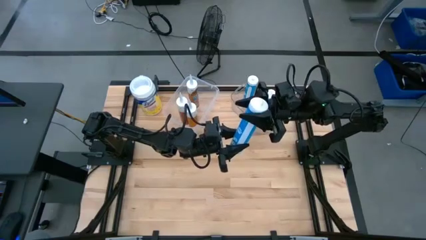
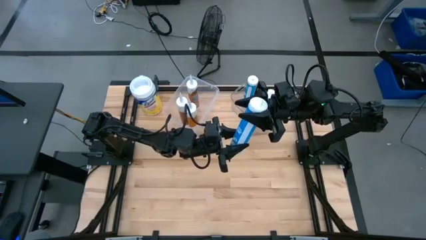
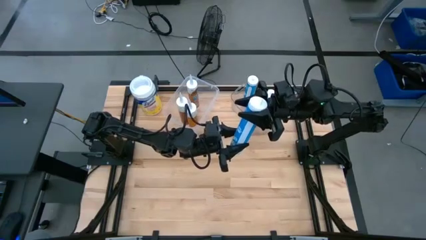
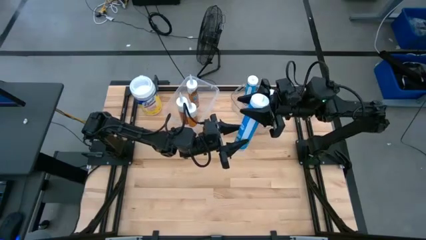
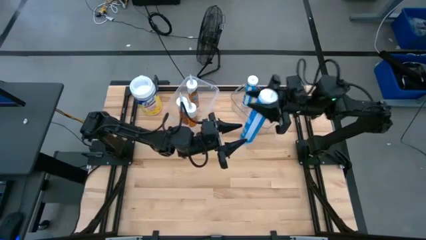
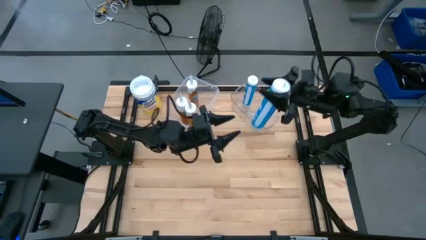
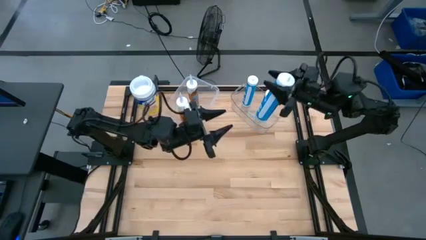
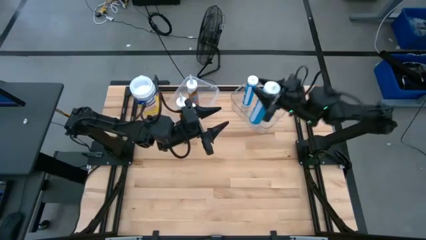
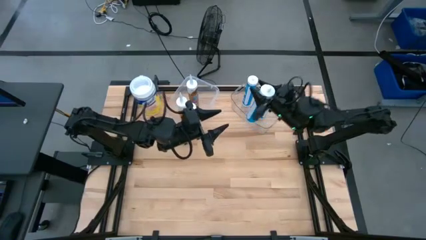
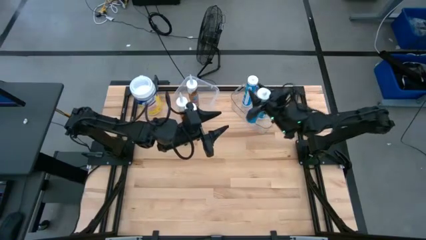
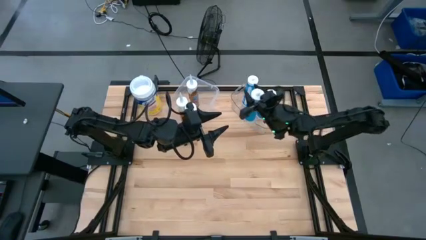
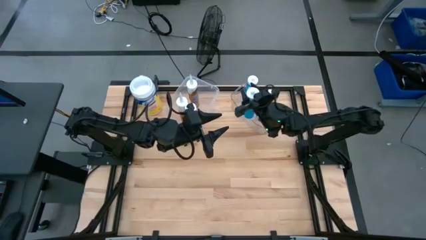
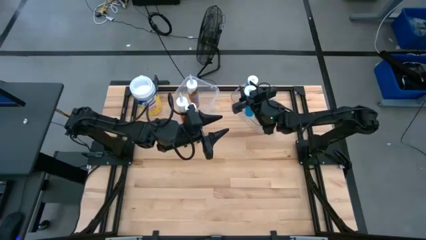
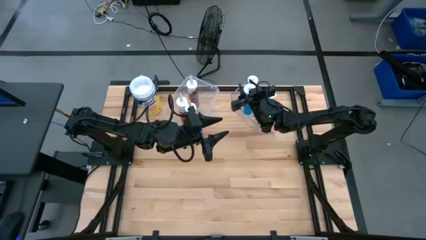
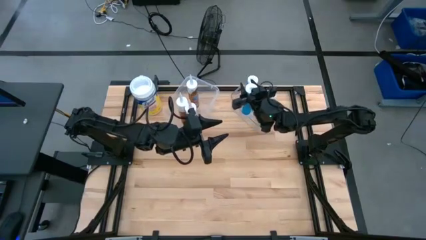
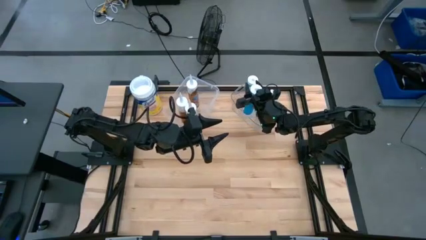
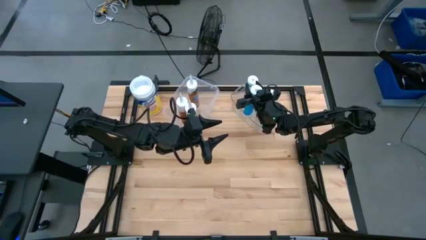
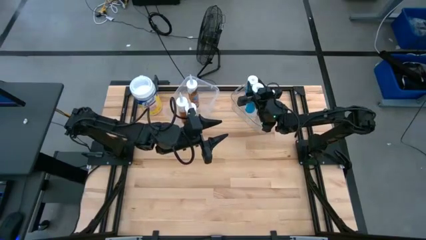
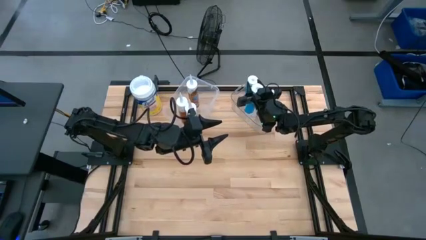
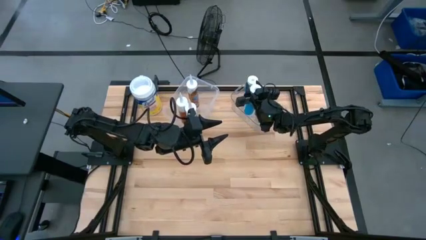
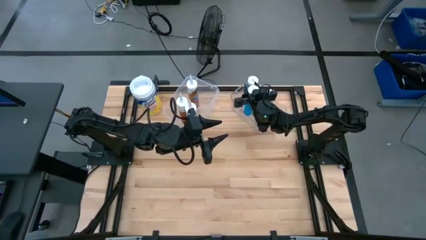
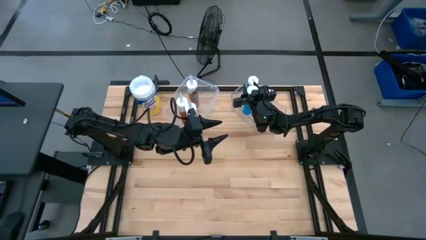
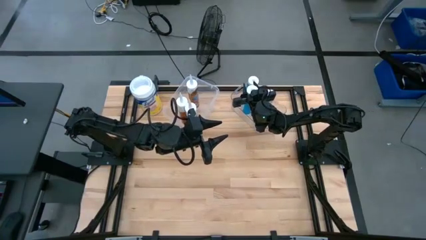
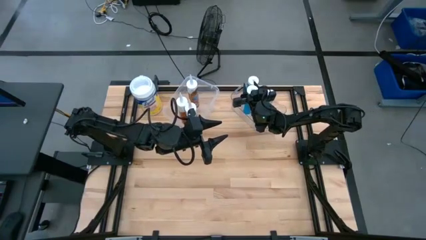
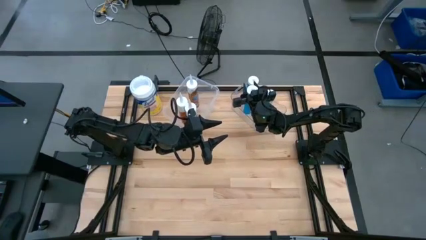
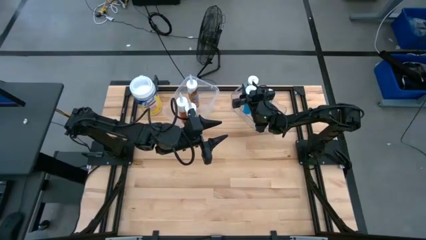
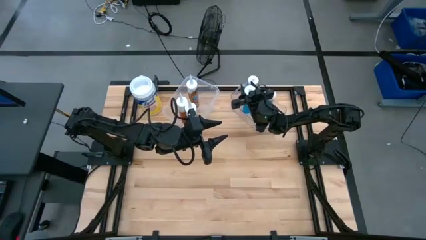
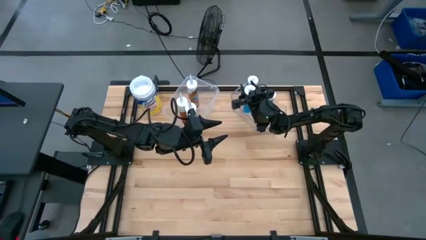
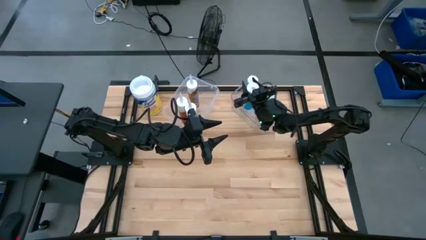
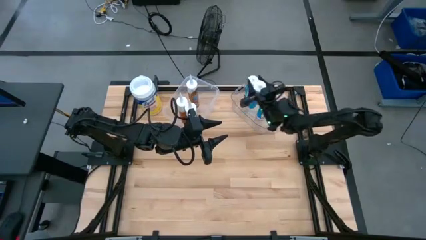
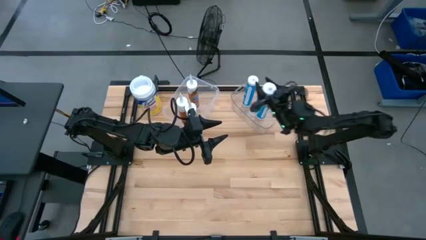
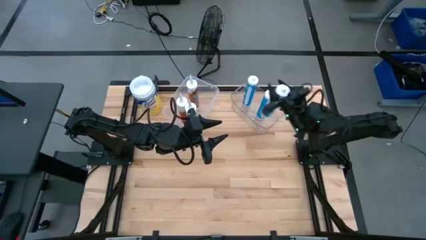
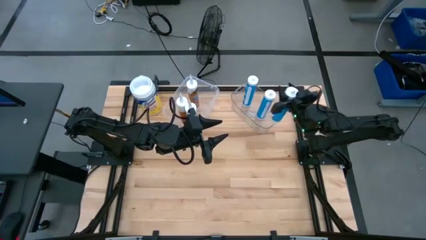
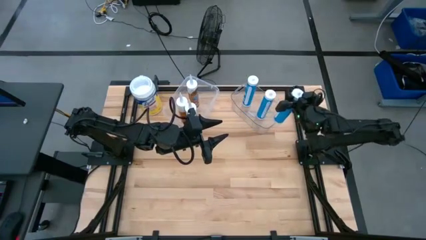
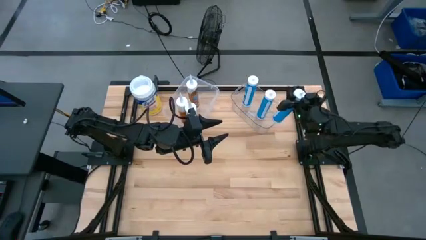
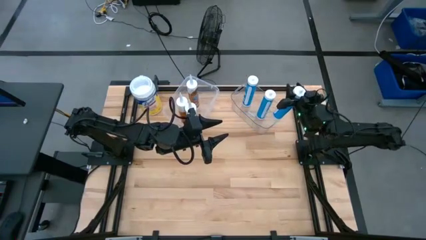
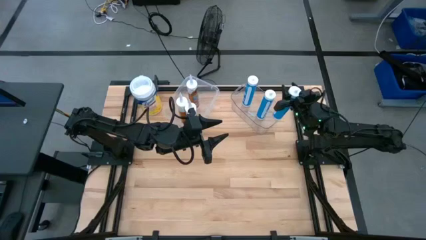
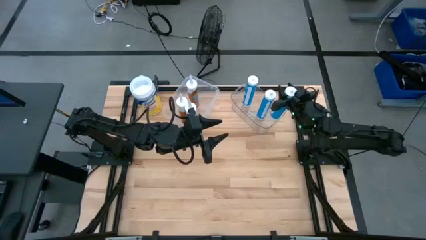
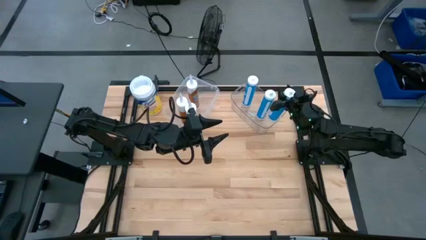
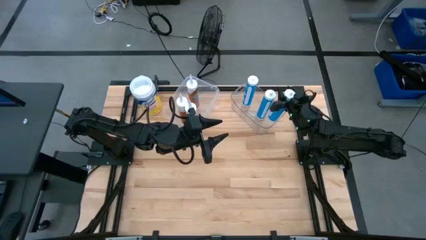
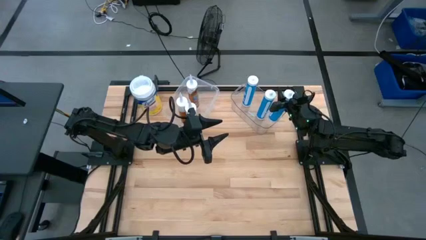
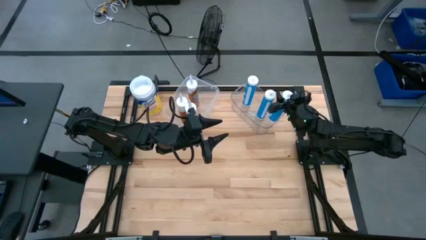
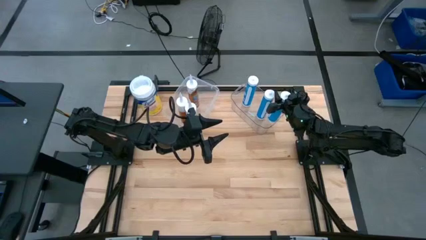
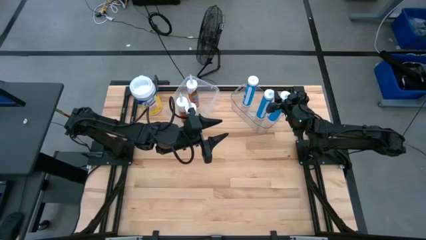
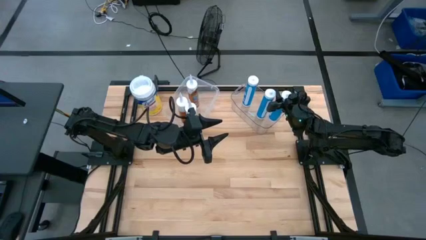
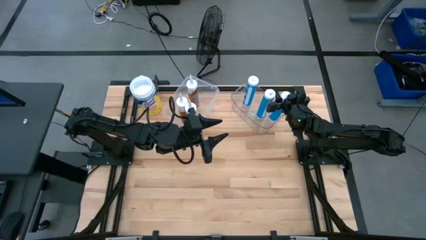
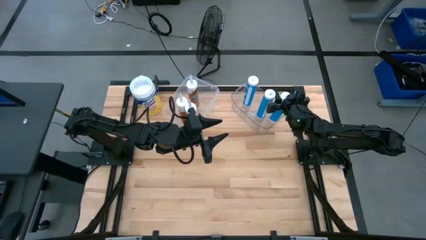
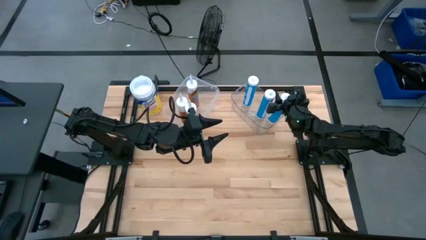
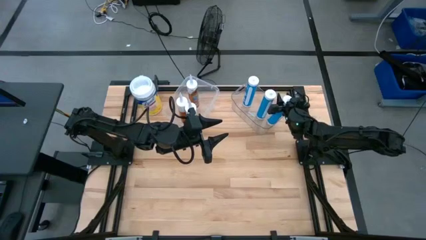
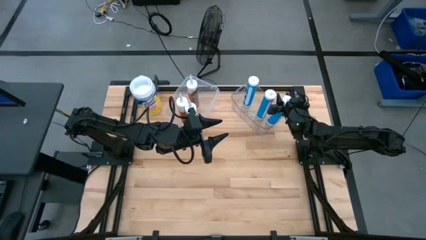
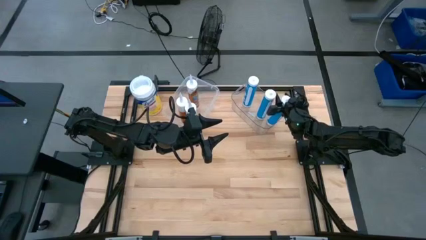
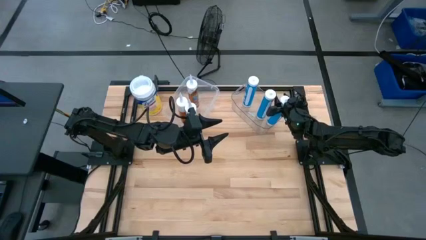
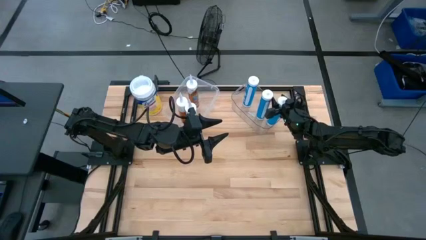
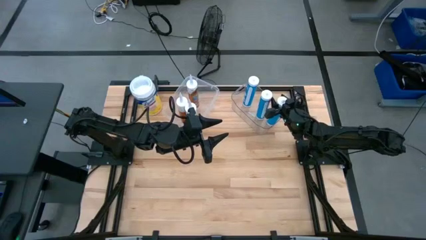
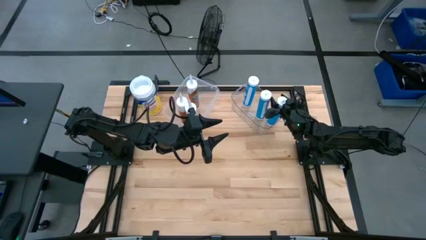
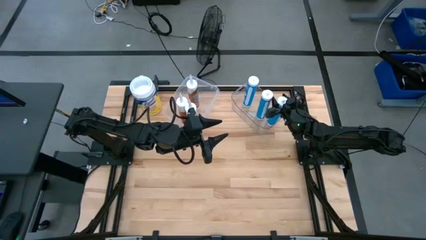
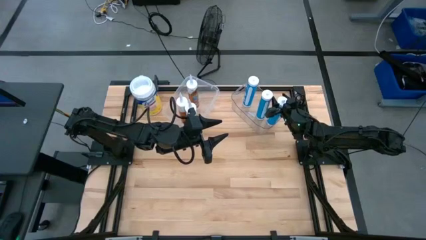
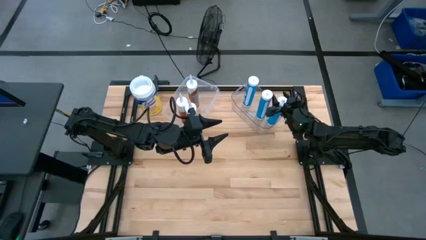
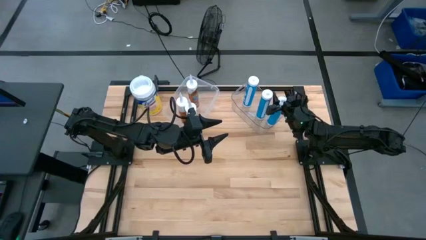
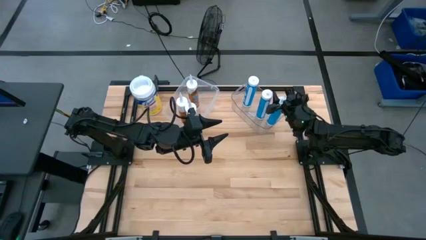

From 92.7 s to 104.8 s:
Task: Pick & place silicon tubes, Sealant and Lysol wipes
Put the blue sealant into the transparent bin

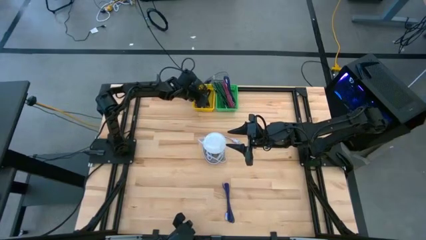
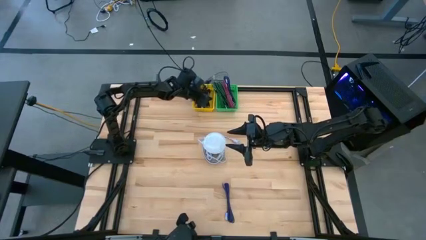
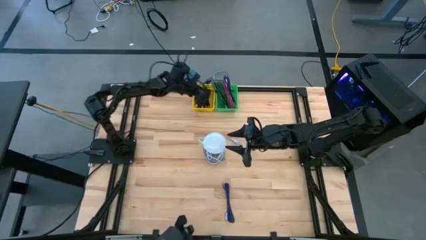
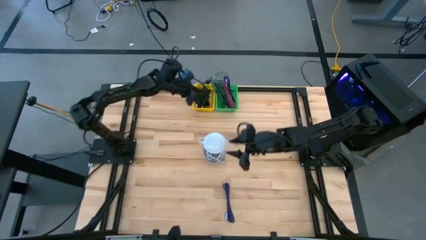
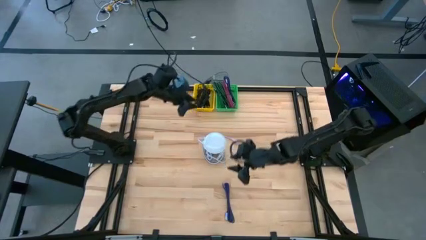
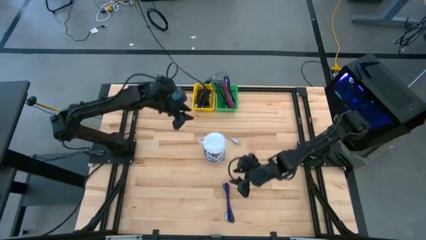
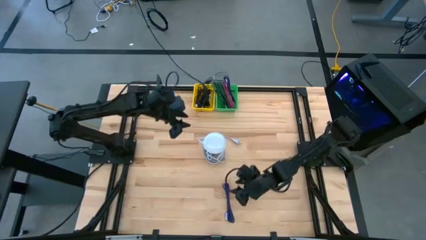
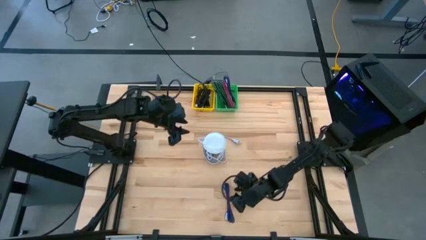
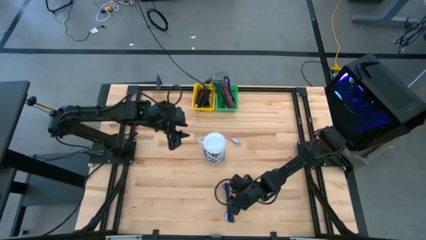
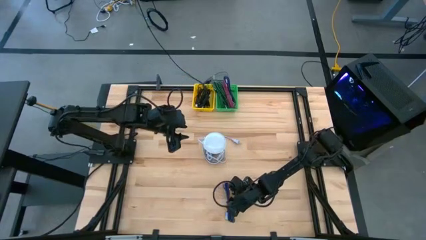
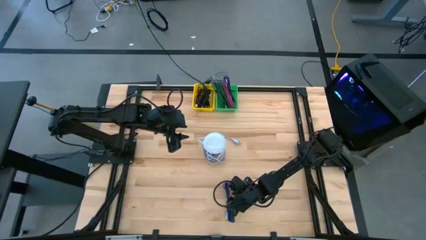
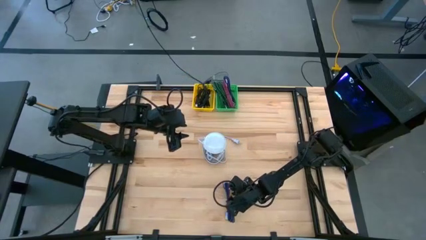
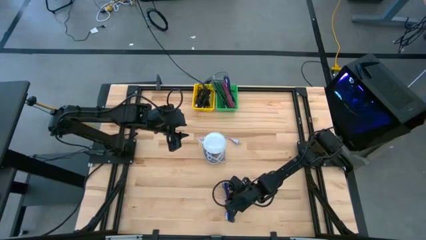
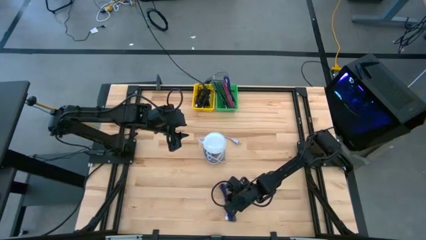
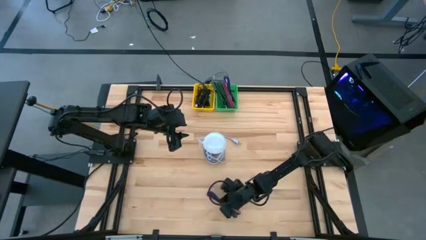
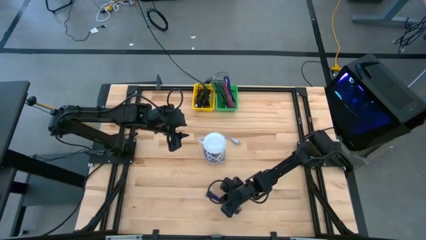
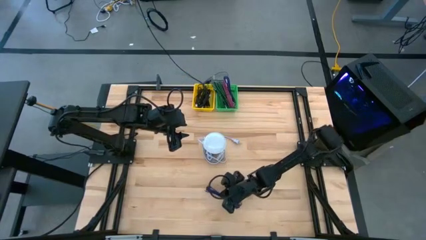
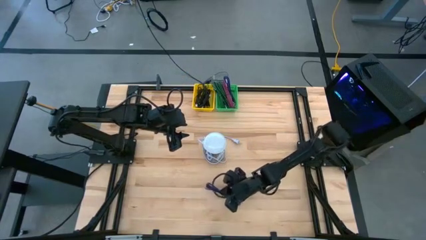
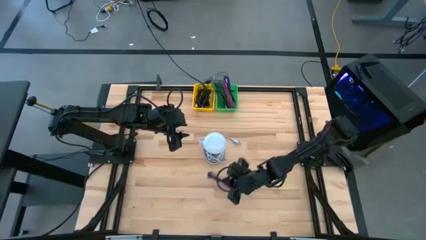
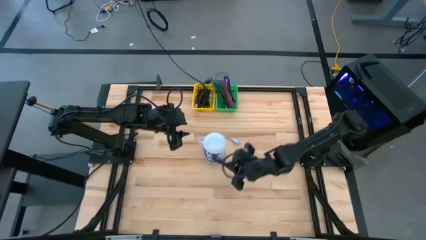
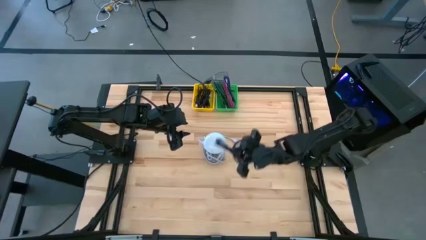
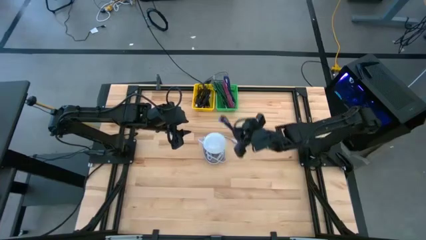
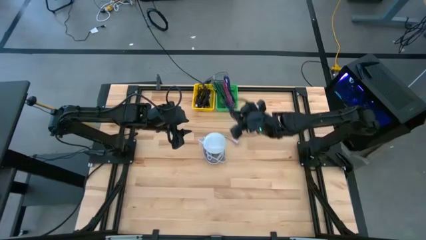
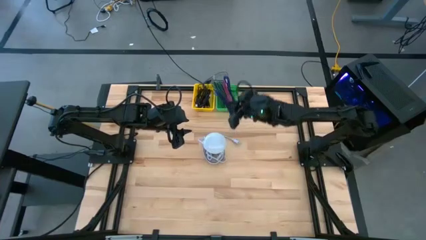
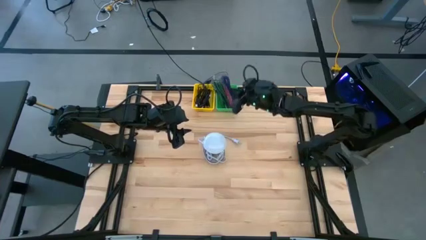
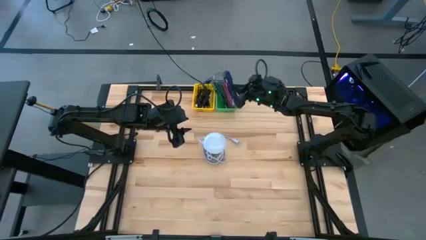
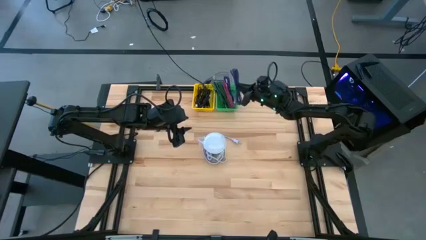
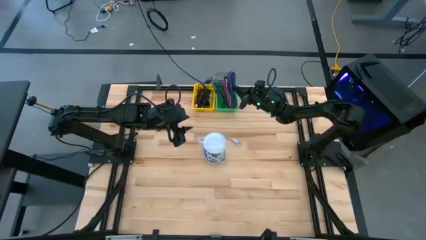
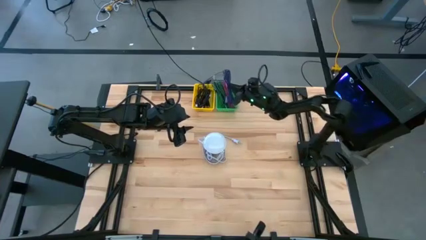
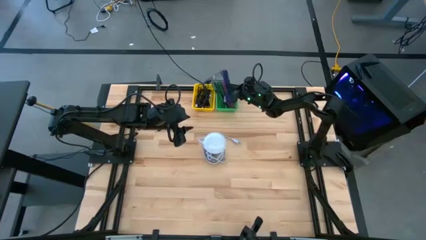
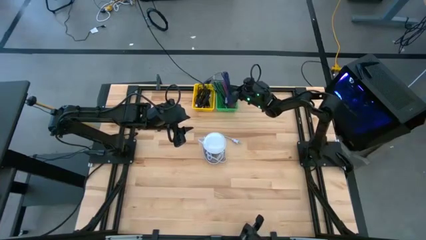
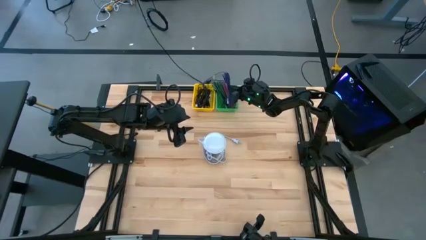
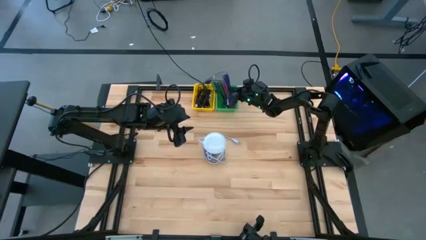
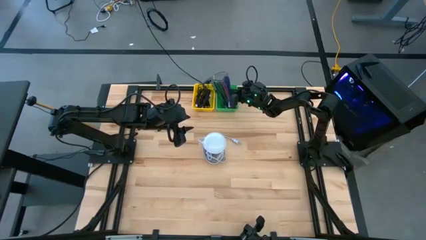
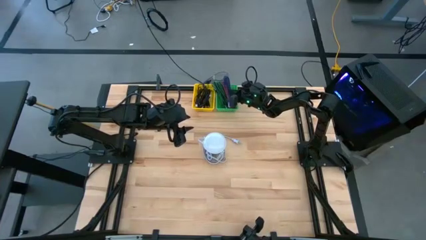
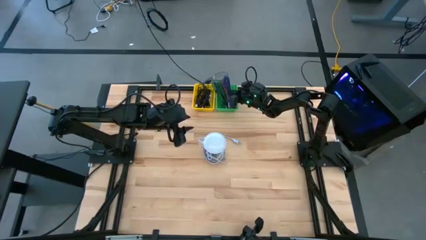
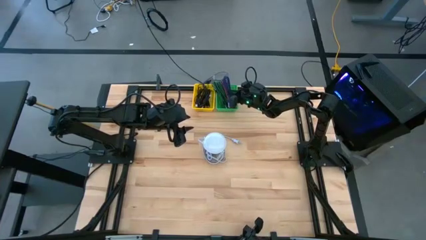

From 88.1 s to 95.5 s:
Task: Pick & Place USB Port
Put the purple charger cable into the green bin
